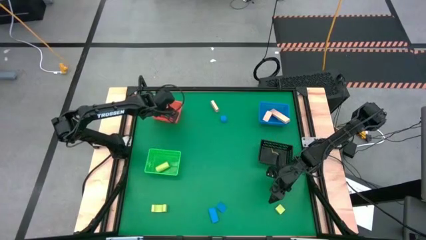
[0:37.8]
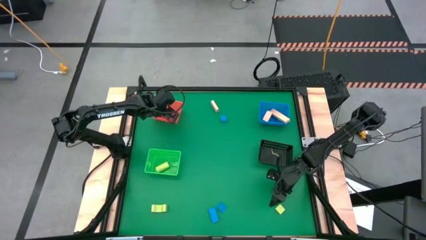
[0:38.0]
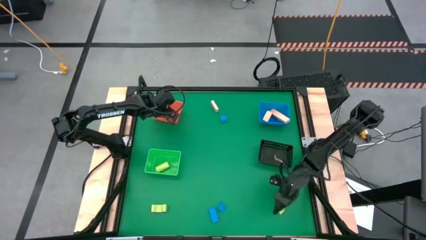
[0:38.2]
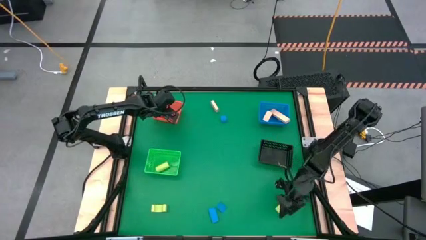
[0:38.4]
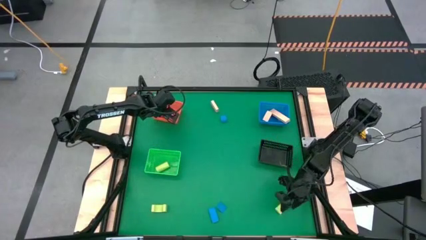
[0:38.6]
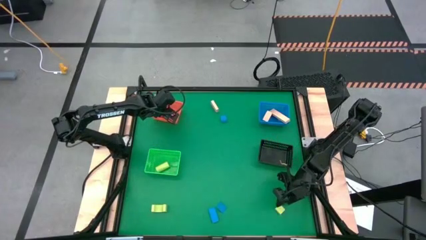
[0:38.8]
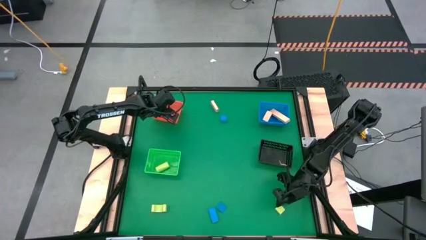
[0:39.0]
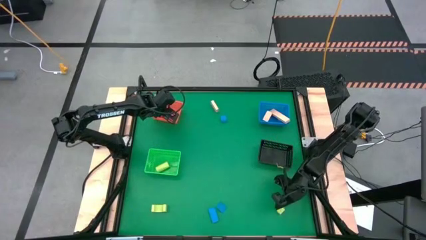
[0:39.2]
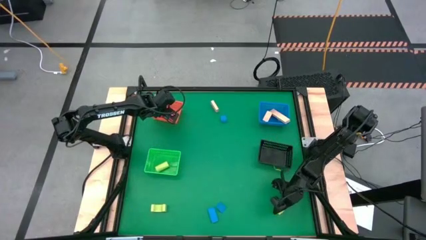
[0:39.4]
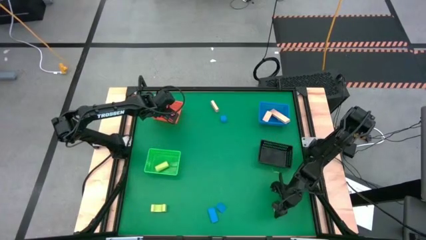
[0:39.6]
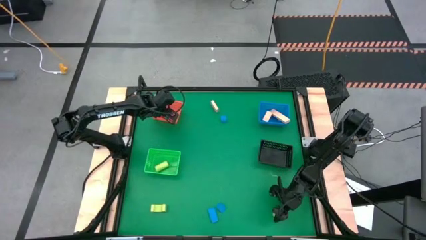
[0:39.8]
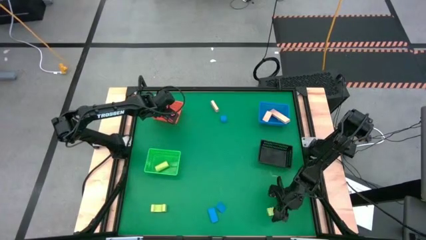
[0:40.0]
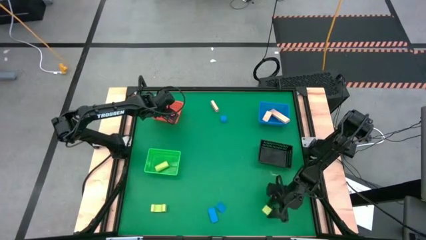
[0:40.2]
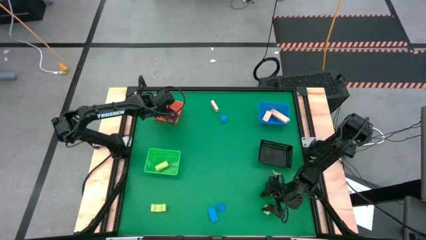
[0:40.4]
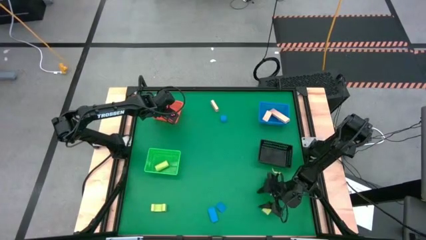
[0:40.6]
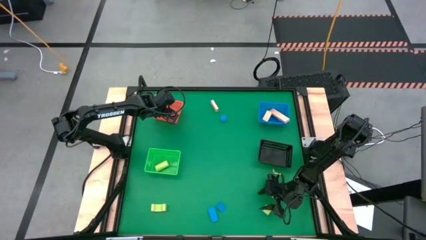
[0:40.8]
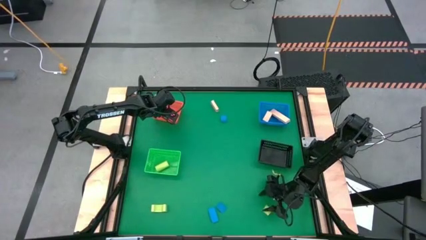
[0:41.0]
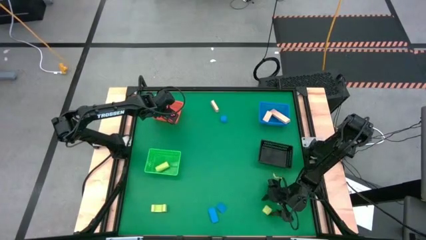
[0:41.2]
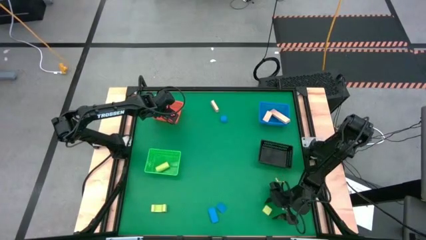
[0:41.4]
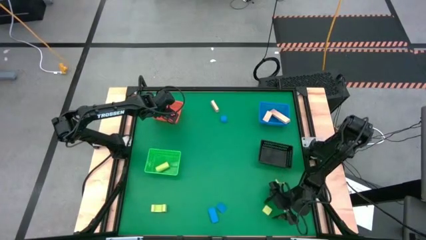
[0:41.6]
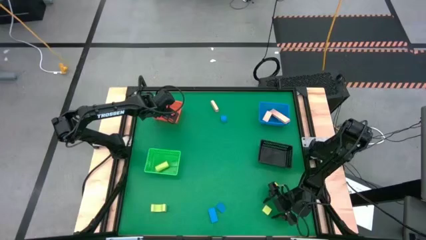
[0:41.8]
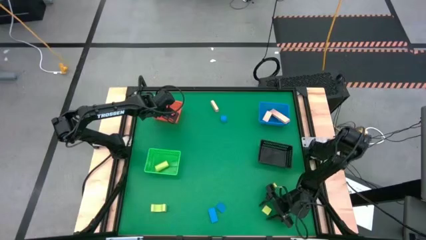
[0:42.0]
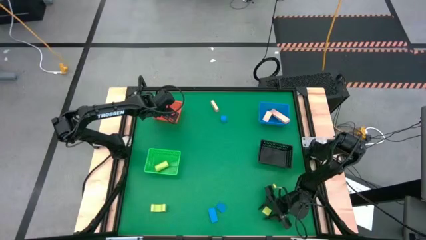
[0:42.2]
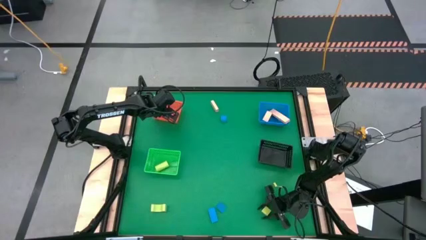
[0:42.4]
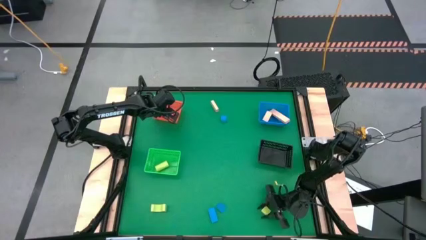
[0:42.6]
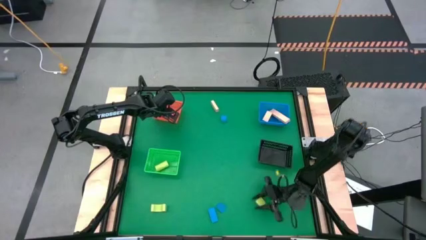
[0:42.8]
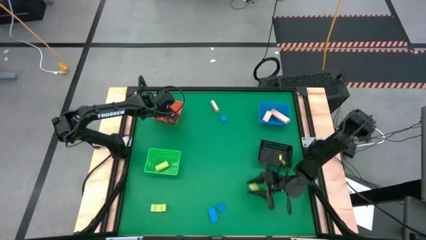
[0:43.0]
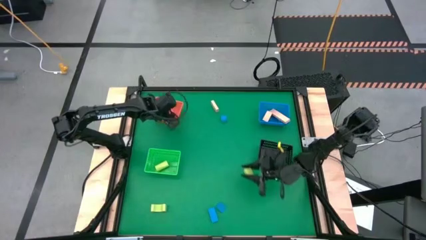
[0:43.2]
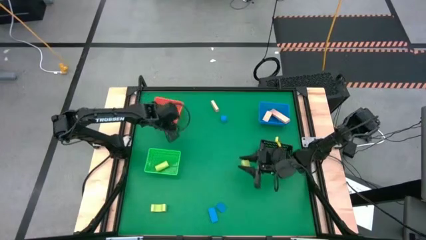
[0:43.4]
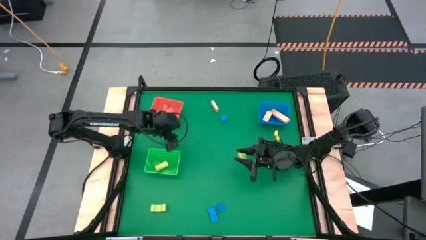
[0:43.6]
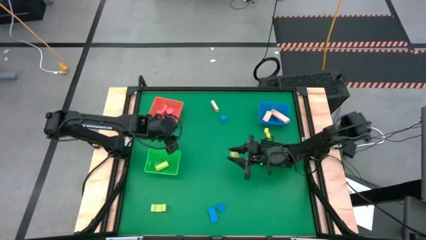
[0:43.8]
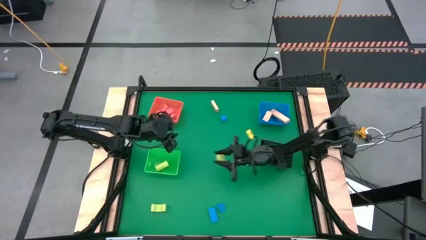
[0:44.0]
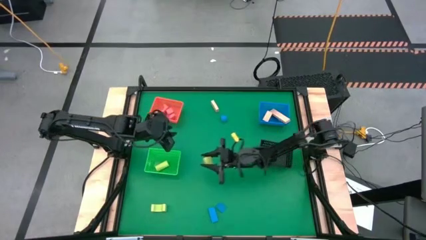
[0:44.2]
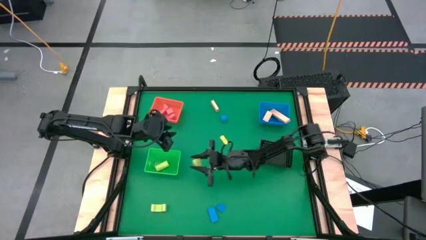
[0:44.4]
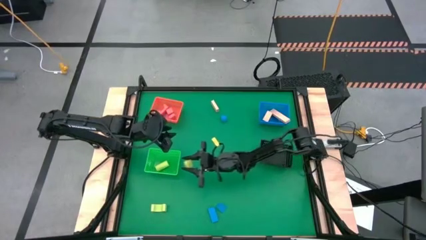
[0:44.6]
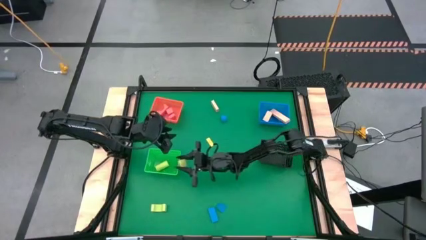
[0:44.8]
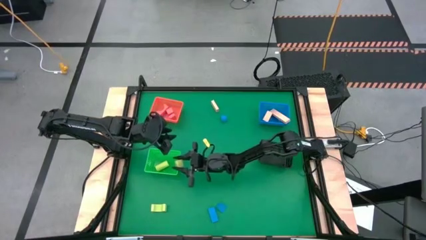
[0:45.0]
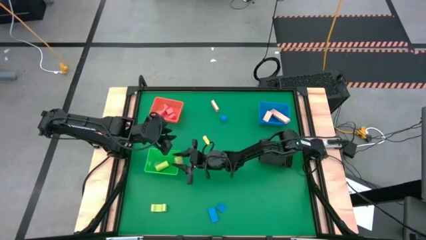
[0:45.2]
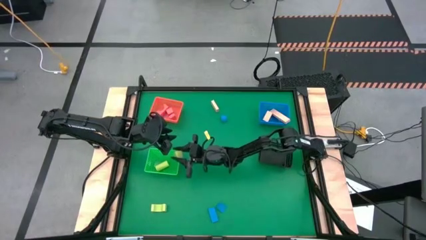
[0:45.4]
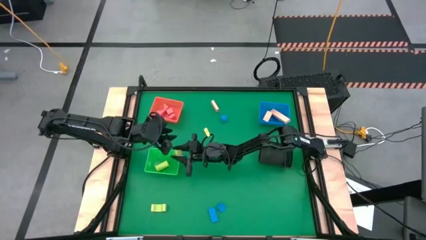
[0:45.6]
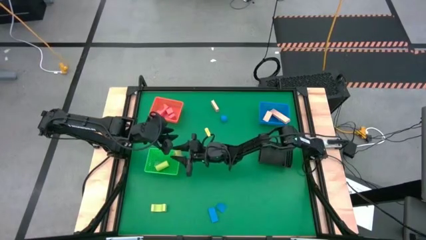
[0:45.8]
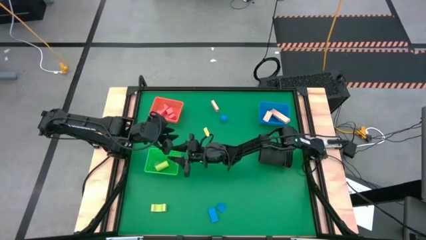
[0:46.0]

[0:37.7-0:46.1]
Task: Sort & place blocks by color
Put the right green block into the green basket

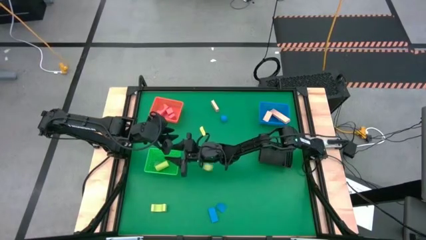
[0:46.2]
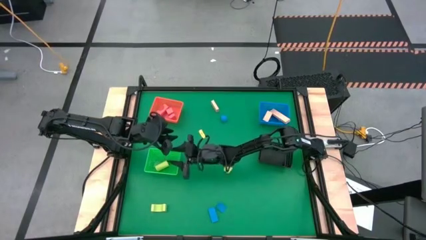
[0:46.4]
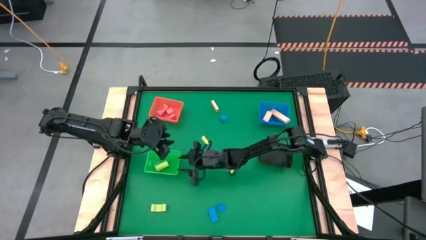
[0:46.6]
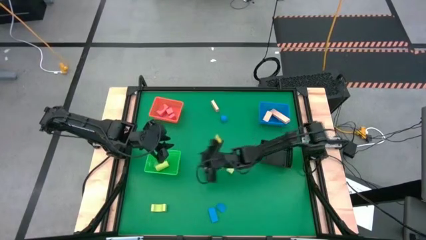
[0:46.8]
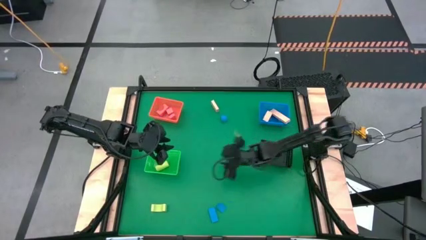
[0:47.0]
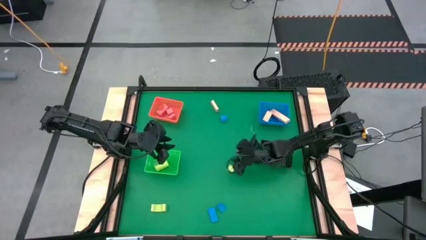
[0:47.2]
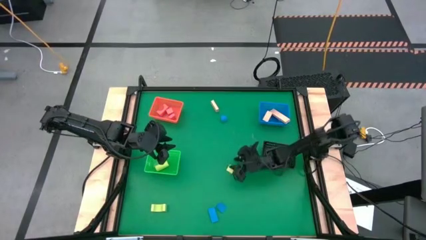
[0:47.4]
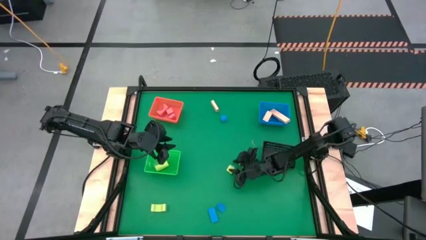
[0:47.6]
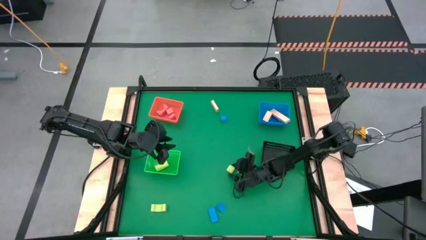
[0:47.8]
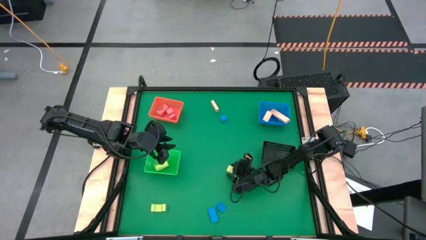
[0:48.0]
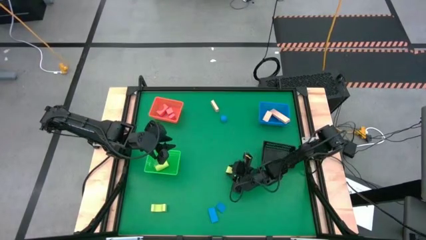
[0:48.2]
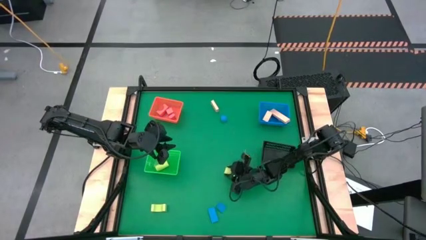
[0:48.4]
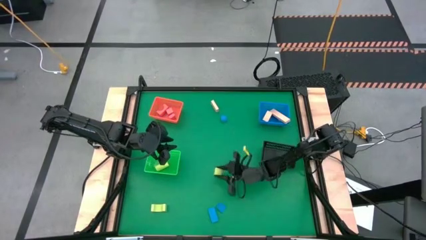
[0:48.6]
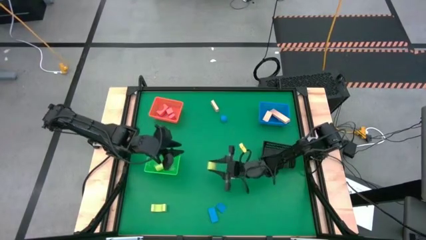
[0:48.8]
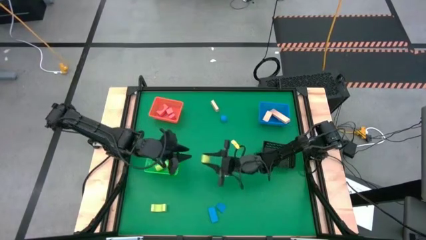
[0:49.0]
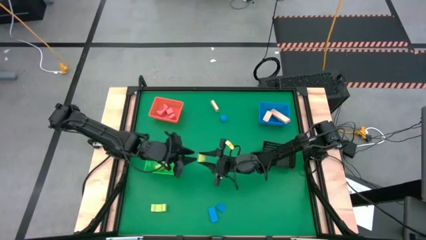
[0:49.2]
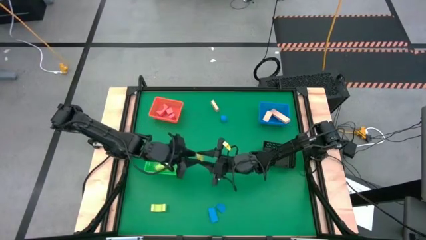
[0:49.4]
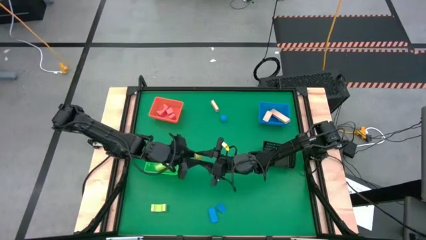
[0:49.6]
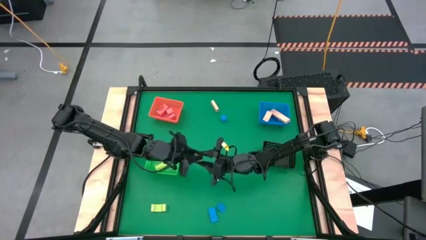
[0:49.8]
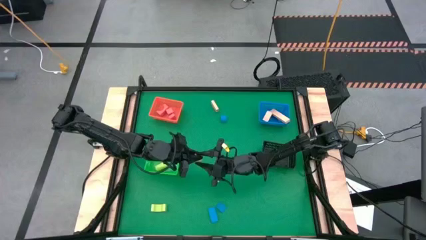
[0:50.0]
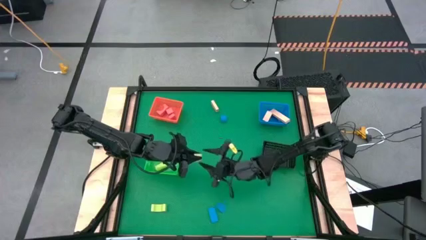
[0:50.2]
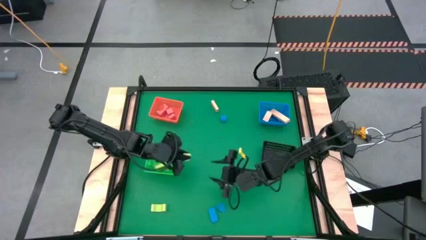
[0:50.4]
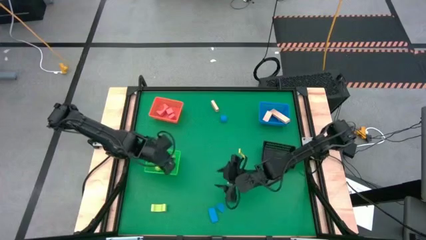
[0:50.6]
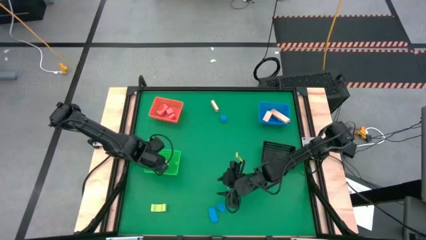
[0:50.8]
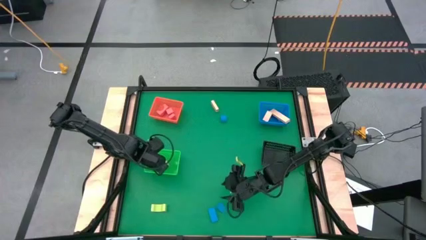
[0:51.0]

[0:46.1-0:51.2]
Put the right green block into the green basket

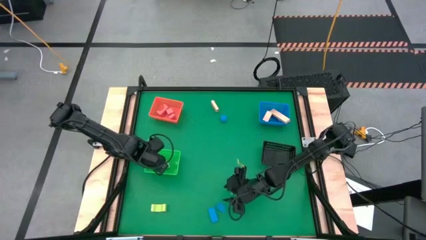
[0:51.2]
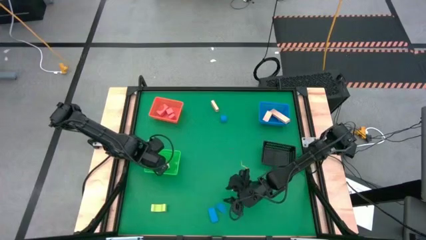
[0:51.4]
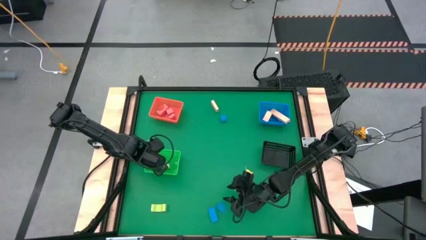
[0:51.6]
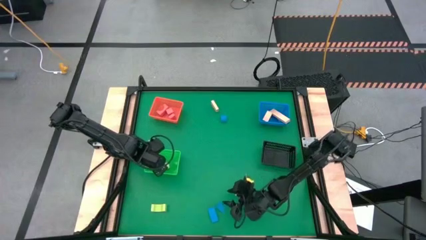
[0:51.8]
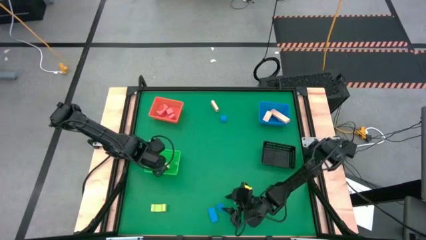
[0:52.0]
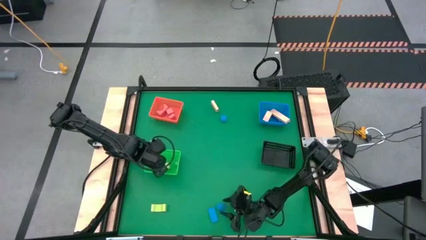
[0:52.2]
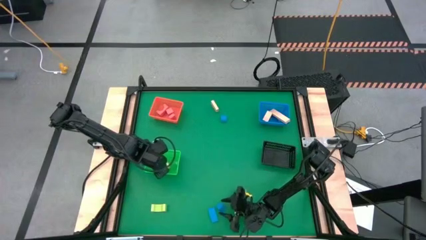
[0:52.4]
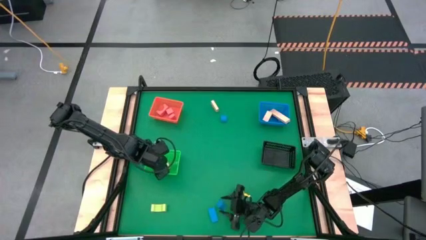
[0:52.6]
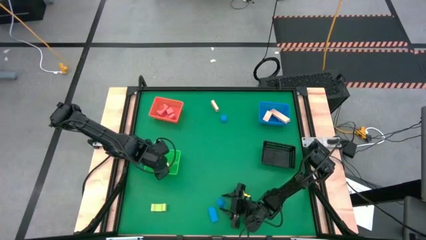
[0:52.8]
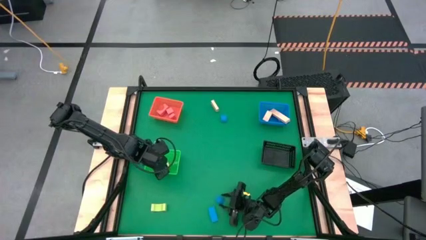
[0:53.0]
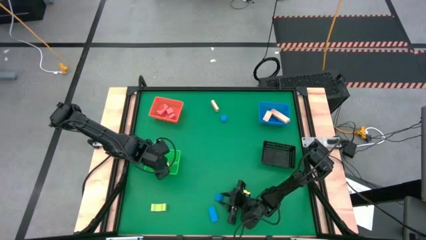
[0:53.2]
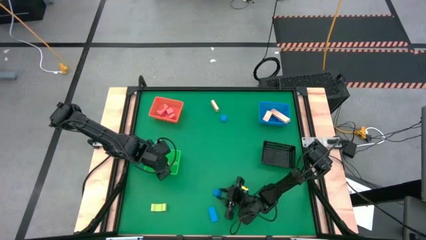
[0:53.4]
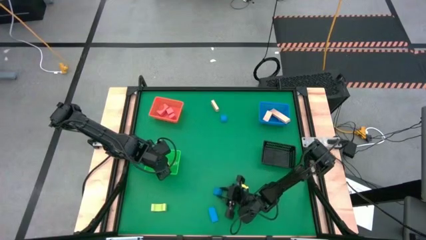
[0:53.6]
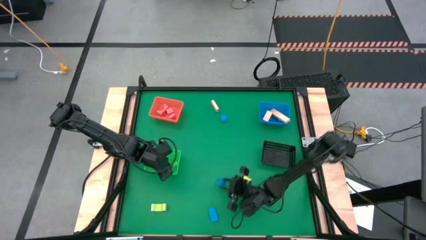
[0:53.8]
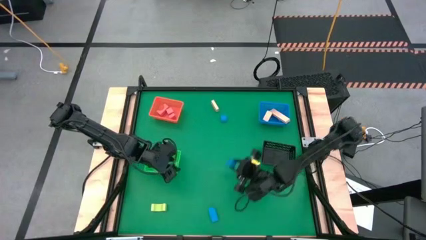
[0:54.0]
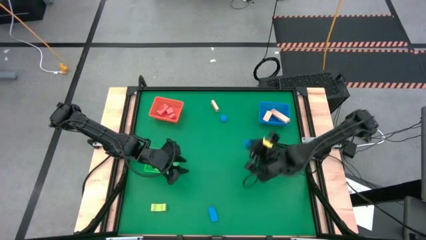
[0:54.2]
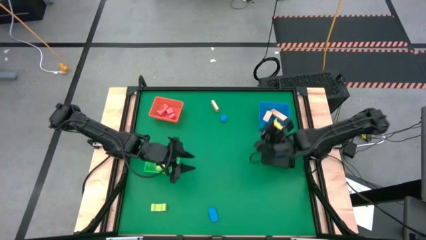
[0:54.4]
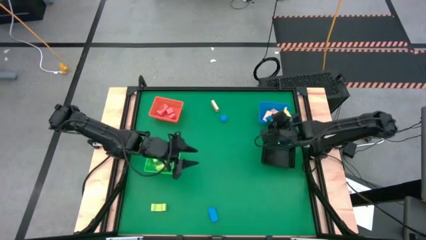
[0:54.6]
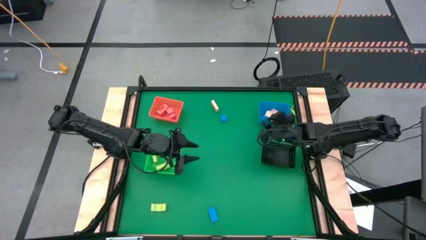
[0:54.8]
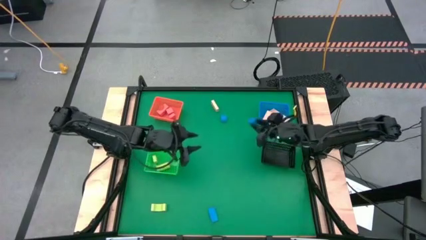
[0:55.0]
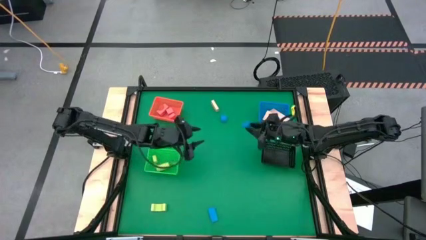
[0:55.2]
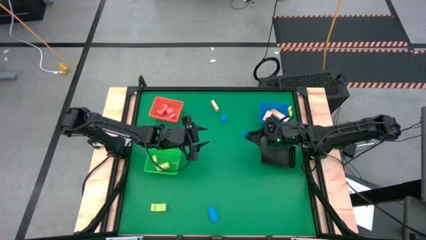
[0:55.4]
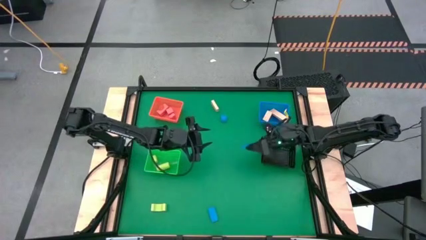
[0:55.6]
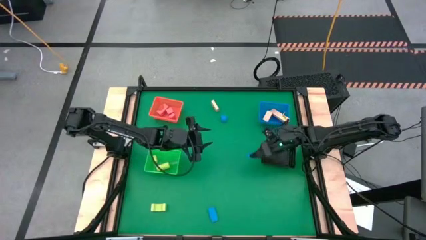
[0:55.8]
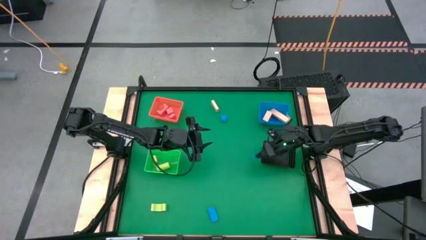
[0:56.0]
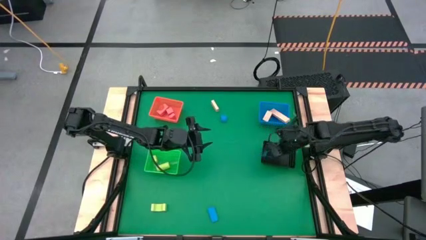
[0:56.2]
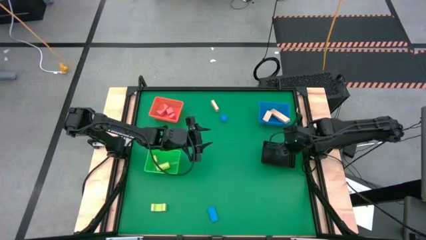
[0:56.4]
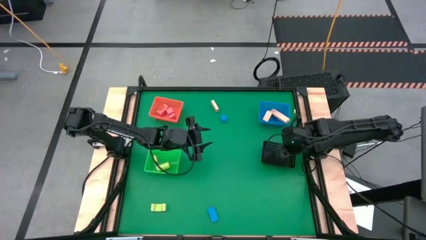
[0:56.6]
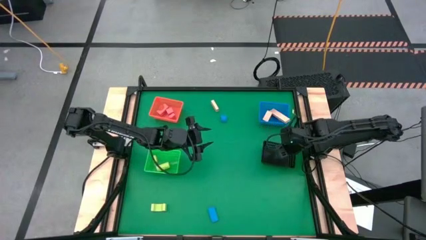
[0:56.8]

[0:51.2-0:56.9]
Put the bottom right blue block into the black basket
